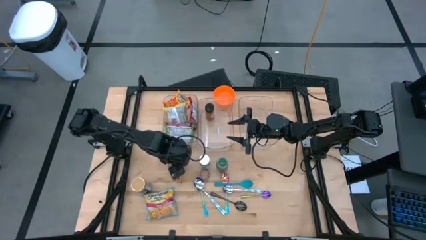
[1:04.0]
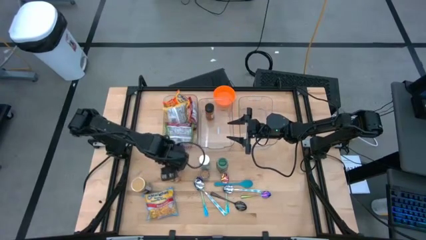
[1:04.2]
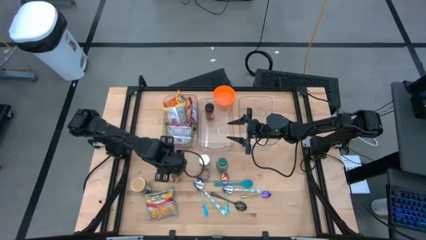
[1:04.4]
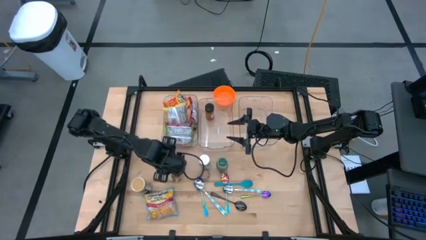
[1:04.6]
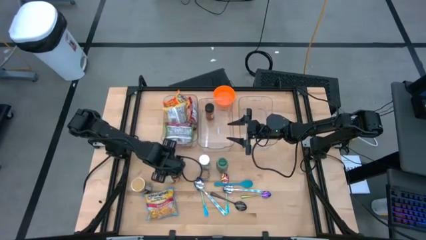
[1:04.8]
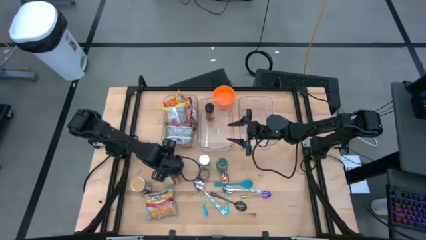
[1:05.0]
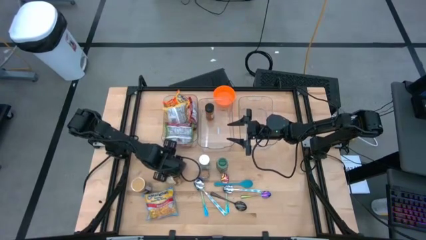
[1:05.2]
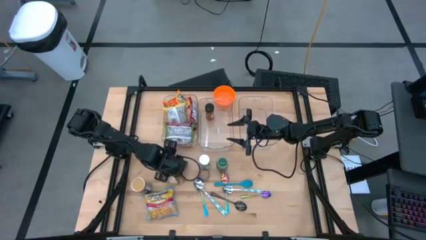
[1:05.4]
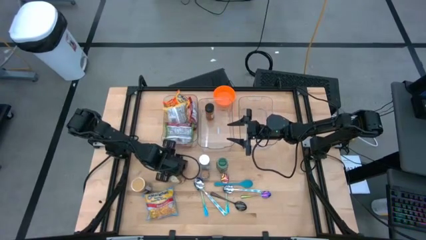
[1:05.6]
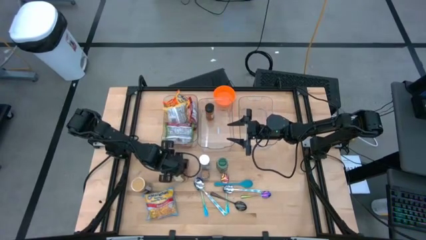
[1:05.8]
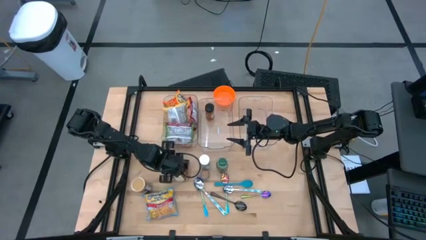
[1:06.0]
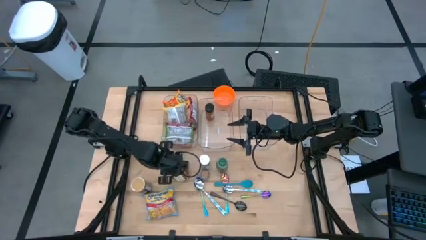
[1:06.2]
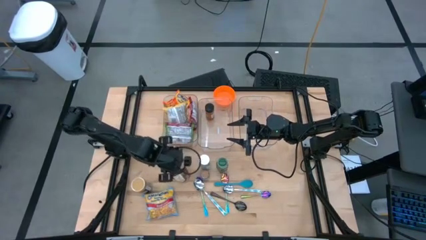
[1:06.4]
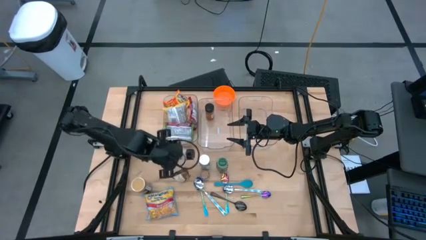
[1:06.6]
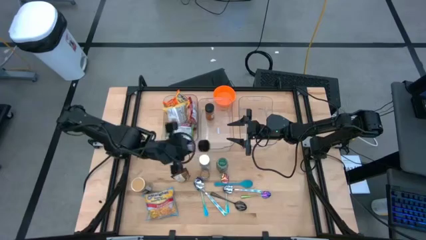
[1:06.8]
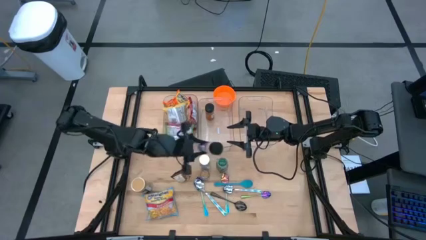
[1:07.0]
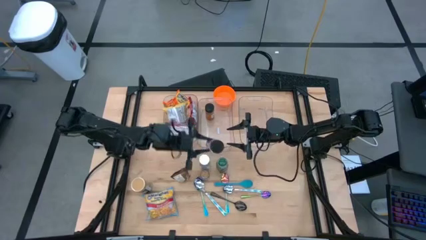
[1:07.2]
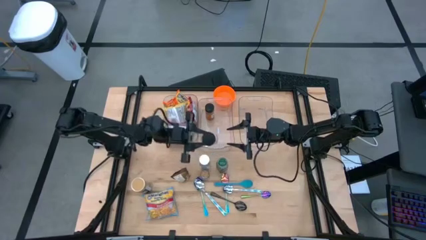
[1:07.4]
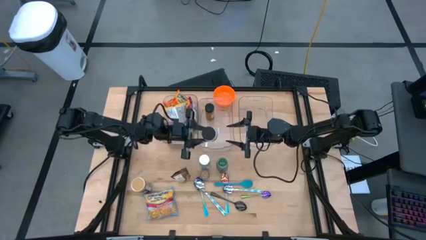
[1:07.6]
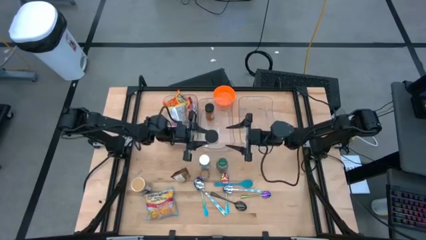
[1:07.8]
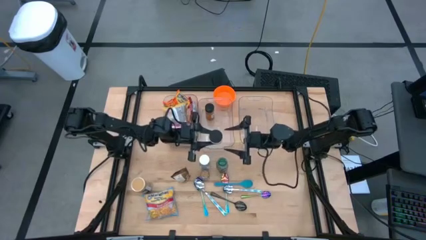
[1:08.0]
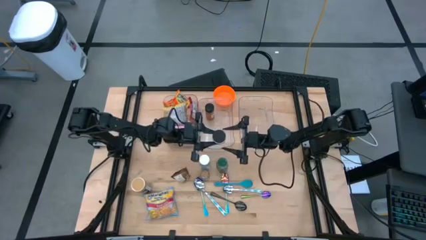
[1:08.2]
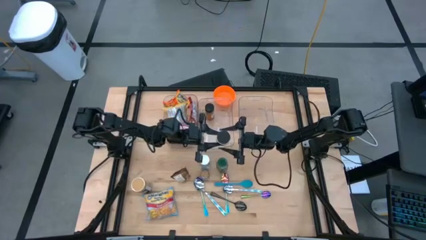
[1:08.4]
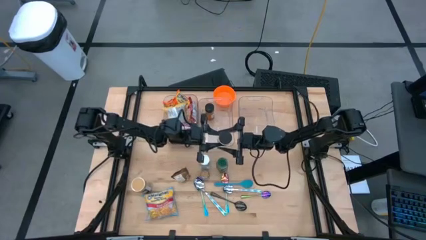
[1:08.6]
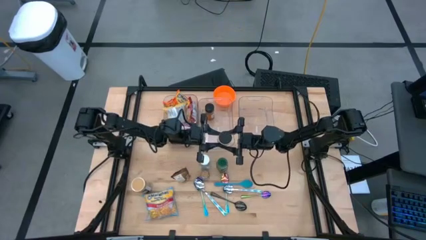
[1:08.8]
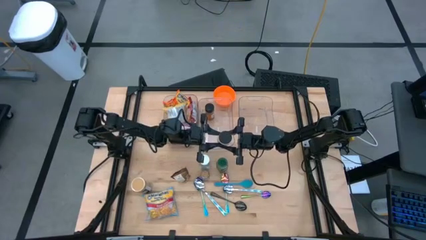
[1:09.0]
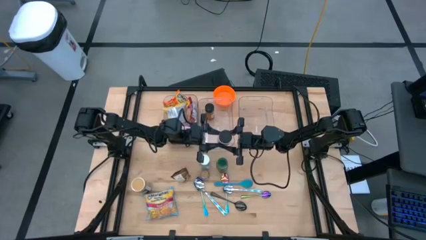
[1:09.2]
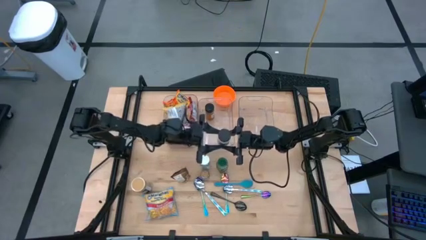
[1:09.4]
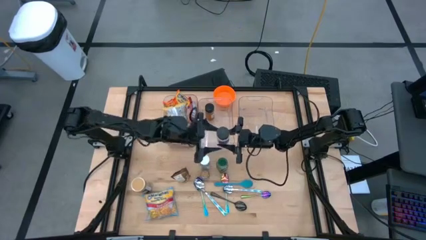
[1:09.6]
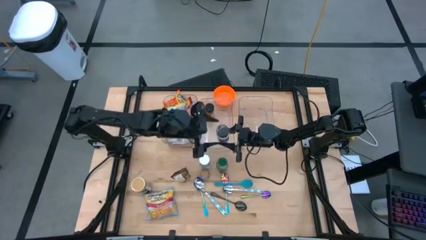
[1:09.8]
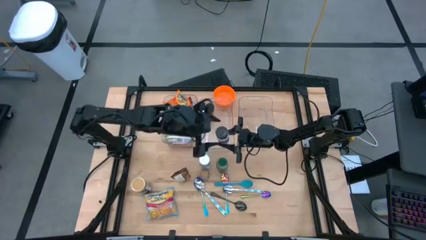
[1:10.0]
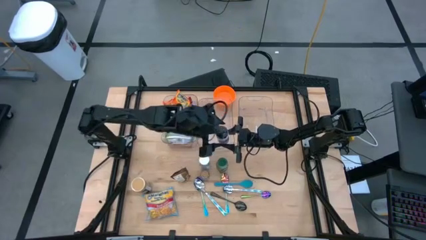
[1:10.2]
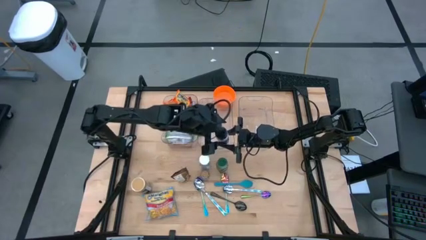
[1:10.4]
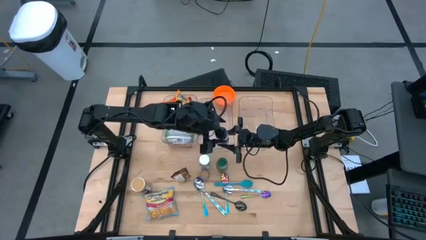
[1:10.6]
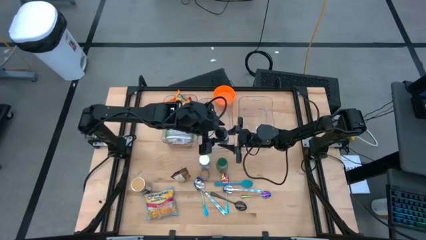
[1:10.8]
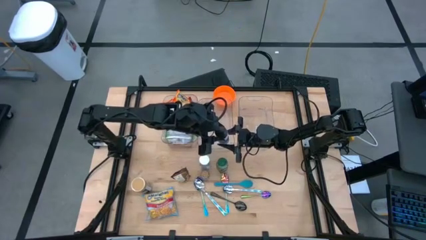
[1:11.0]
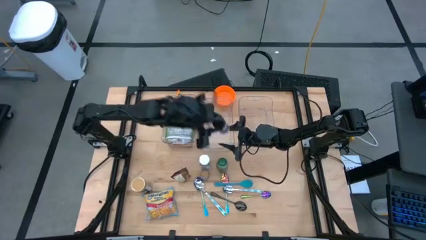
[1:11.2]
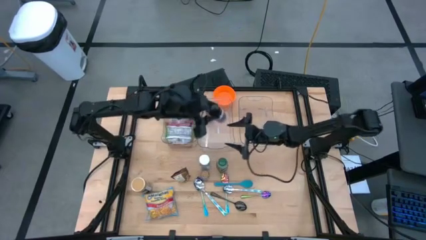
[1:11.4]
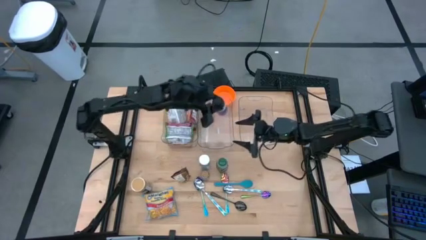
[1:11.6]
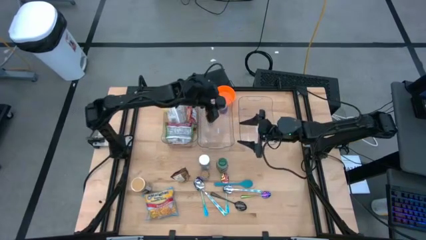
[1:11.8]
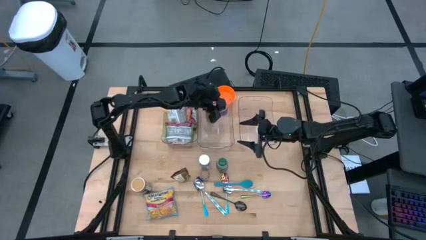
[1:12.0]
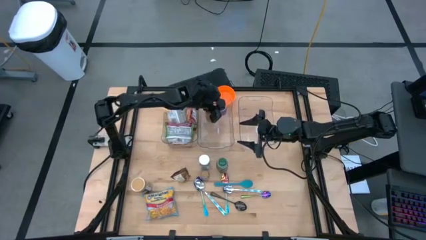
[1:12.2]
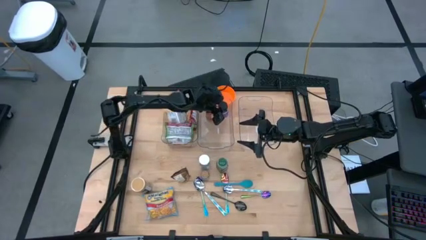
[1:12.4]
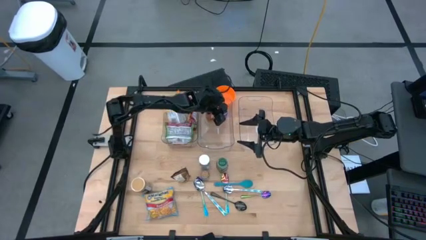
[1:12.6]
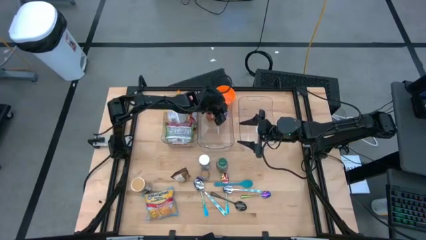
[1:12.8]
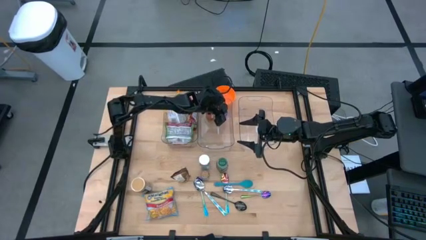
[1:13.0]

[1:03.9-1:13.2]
Task: Pick & Place Food Item
Put the black seasoning bottle into the middle transparent bin

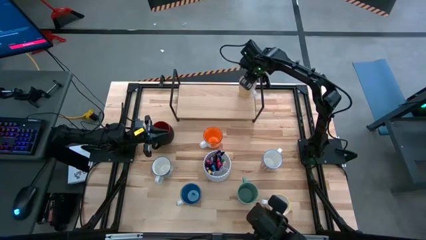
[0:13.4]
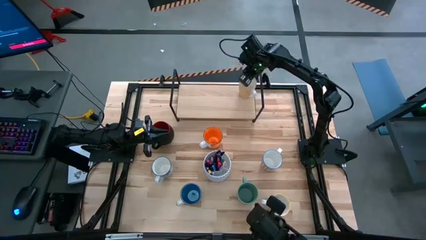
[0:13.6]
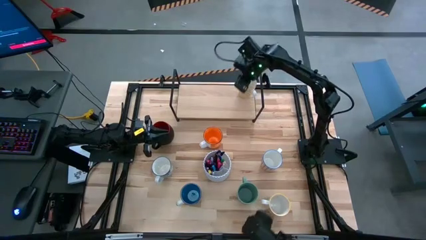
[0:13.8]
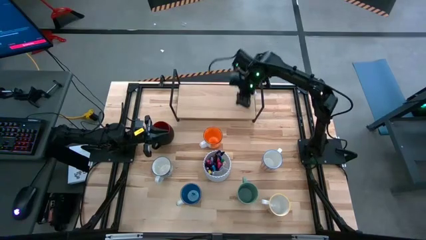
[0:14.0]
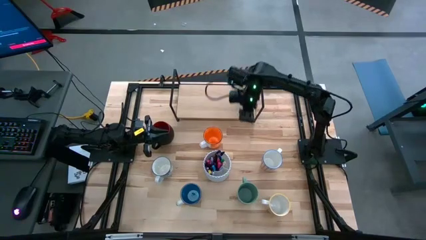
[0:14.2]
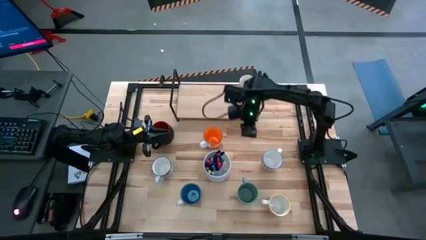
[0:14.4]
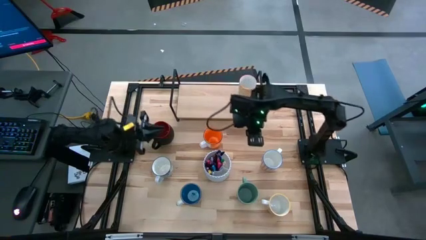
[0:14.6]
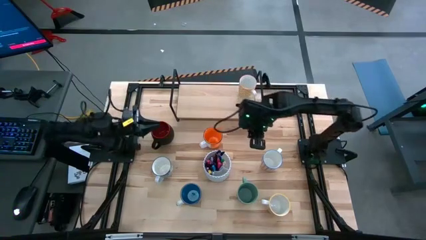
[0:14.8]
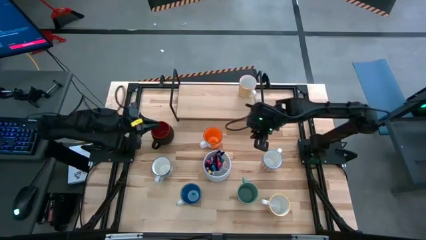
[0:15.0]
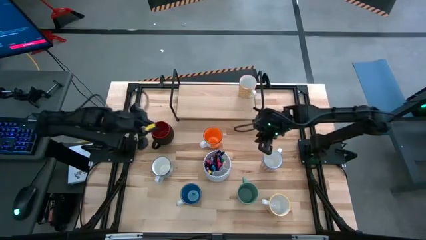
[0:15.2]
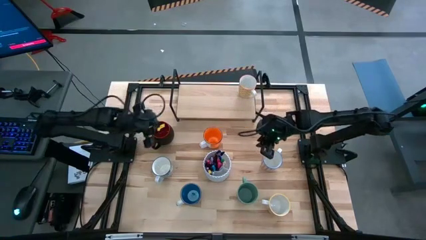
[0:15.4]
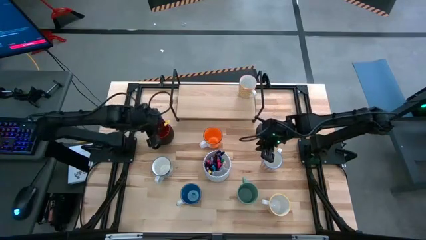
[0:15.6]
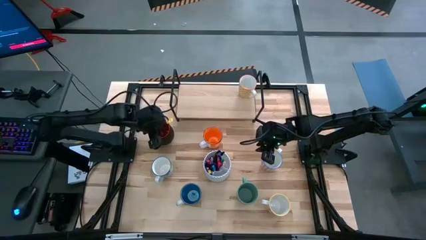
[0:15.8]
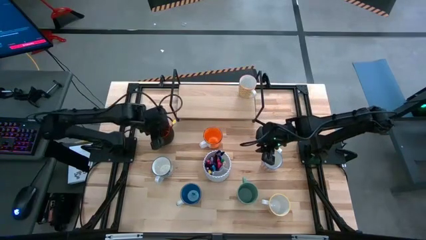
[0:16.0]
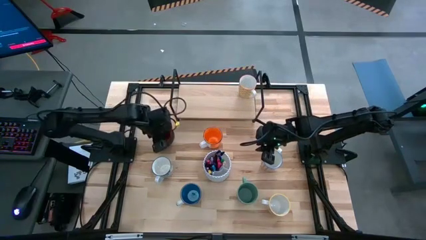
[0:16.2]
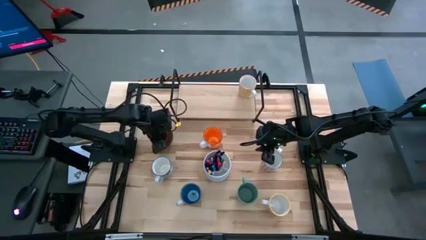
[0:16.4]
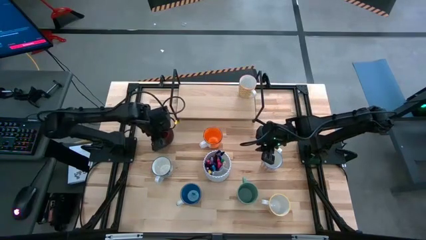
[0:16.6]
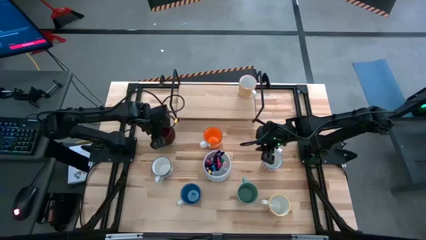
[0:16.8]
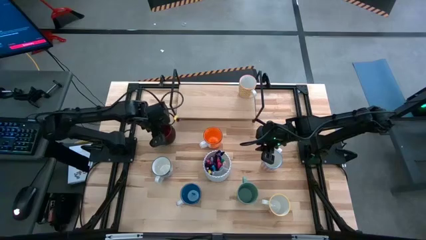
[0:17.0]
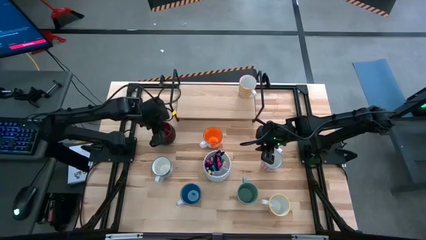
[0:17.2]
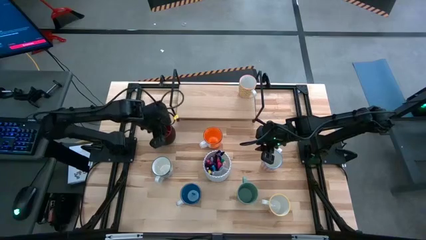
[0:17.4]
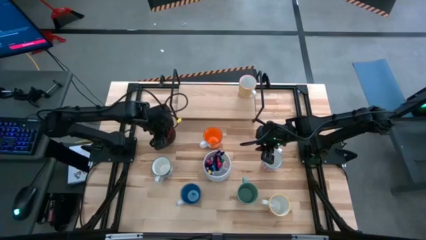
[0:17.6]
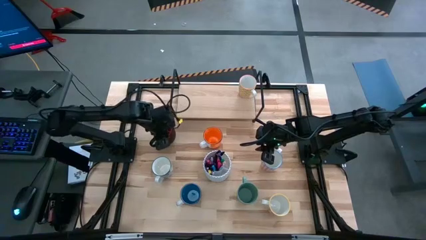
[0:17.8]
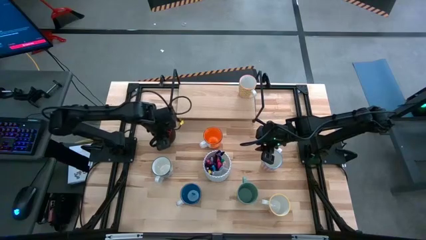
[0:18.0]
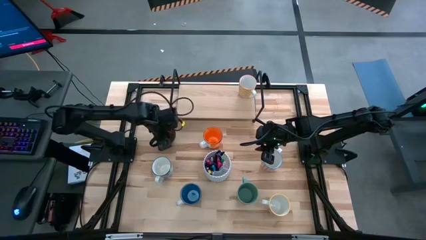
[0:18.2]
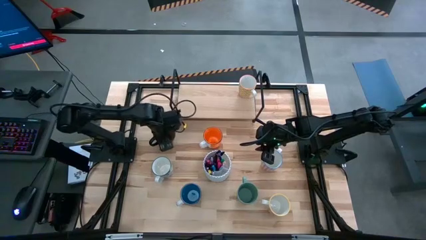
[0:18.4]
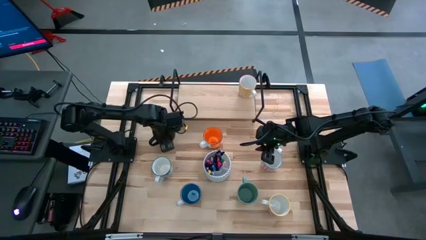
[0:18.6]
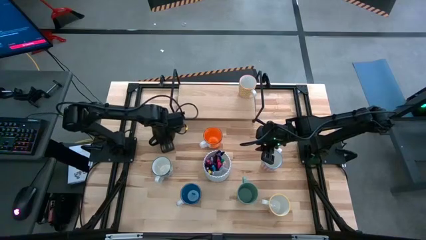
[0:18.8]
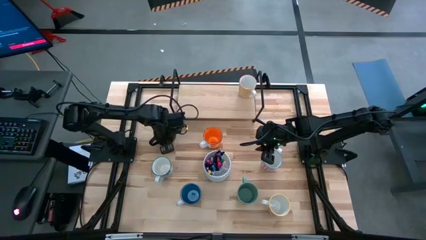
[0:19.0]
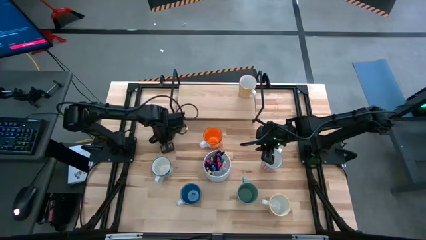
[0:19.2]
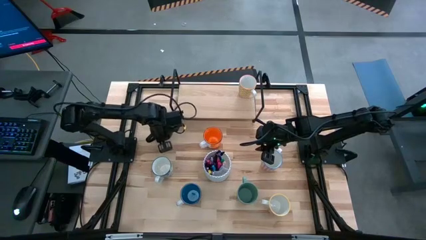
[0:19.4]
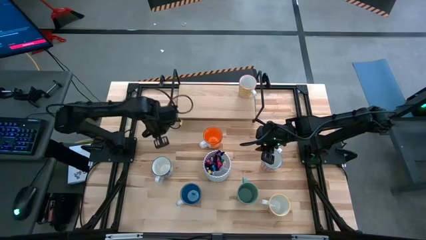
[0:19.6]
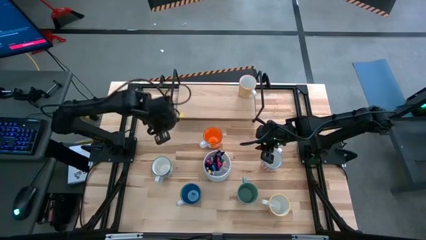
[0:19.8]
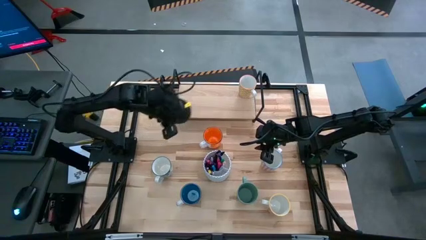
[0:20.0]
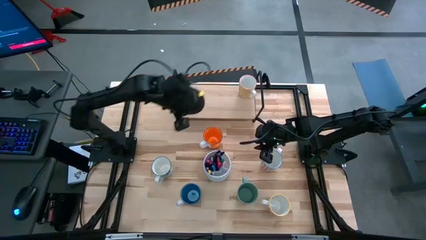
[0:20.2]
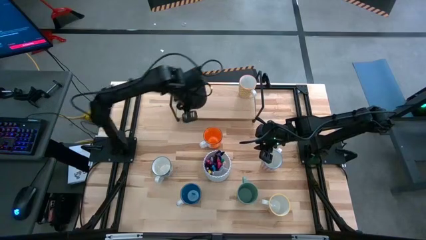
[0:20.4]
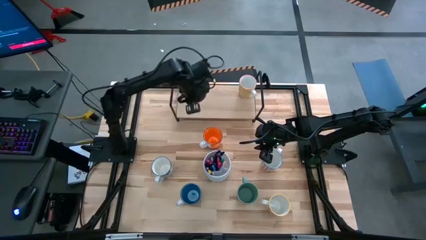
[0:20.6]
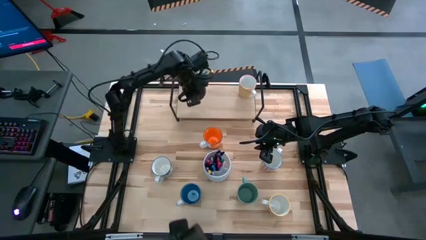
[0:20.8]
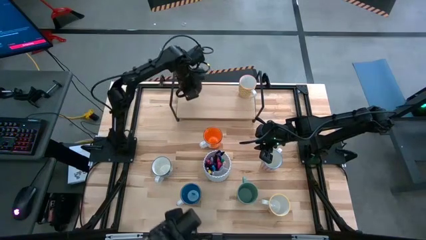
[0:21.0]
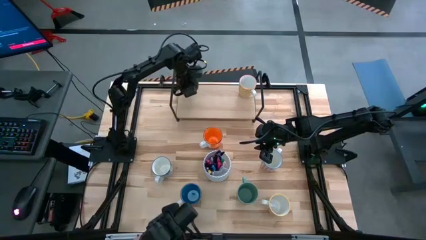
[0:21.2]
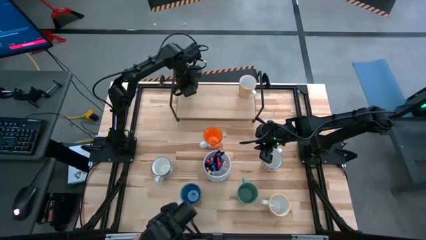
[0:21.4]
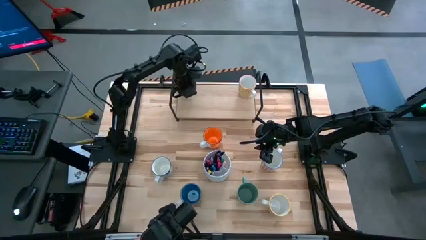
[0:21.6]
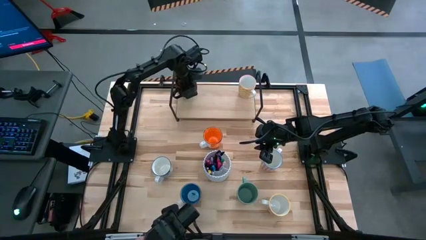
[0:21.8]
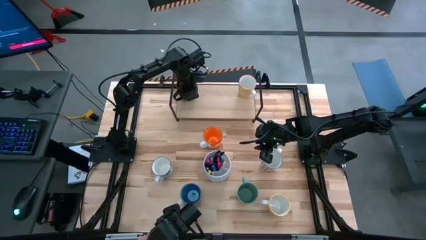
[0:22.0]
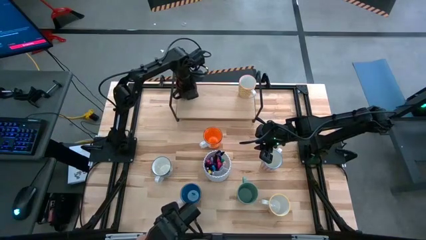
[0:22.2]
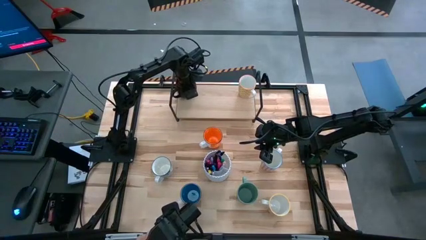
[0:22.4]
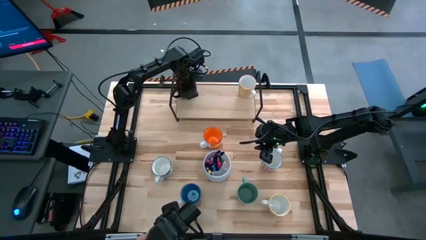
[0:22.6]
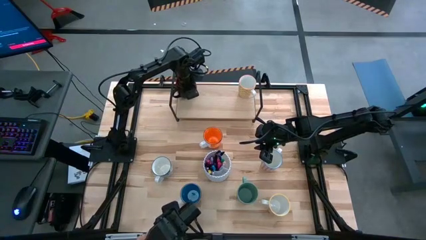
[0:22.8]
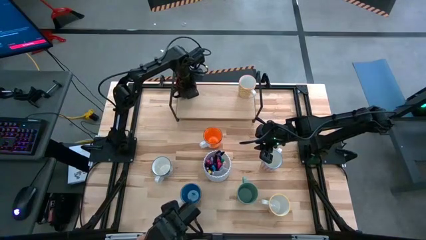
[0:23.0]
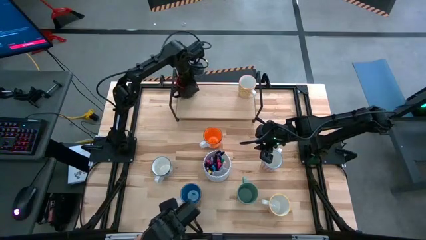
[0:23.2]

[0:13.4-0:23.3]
Task: Place coffee mugs
Put the black mug on the shelf
